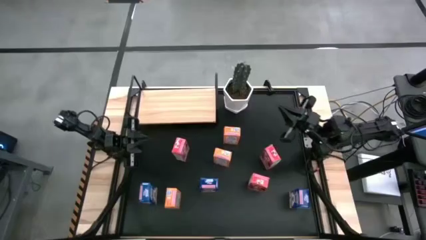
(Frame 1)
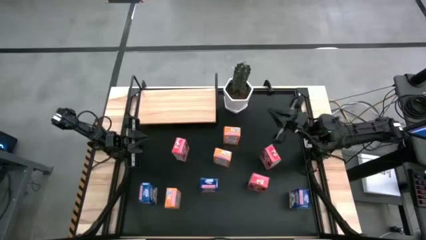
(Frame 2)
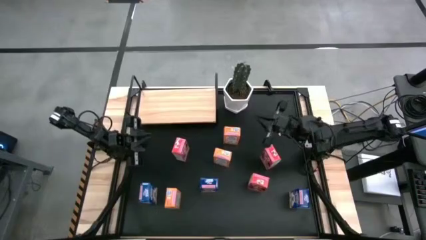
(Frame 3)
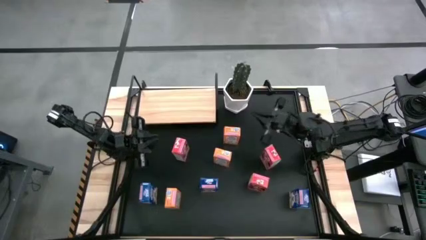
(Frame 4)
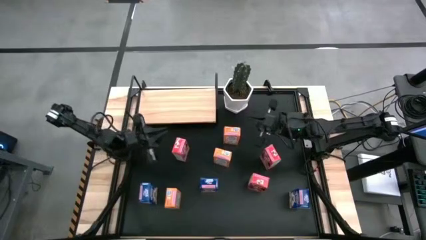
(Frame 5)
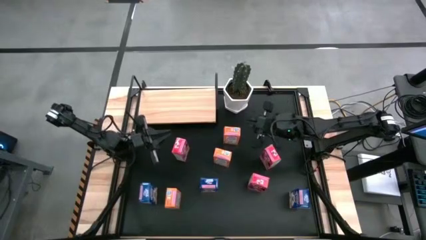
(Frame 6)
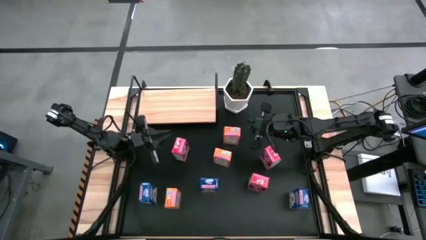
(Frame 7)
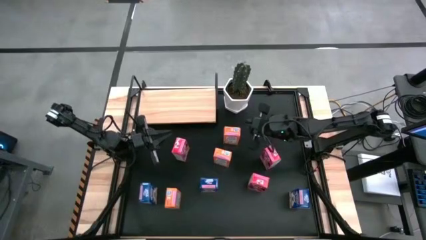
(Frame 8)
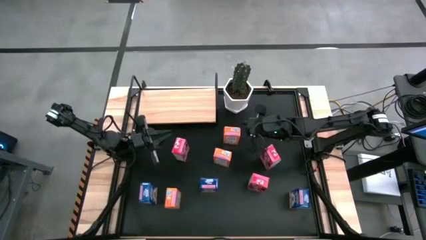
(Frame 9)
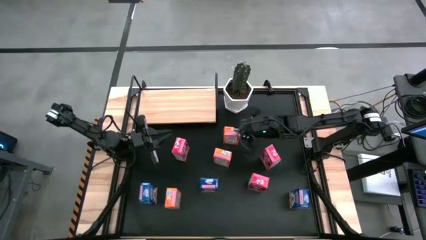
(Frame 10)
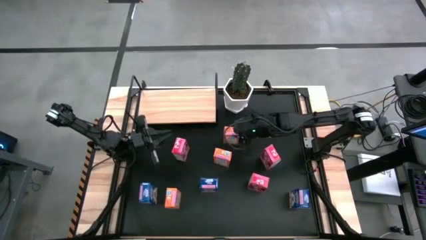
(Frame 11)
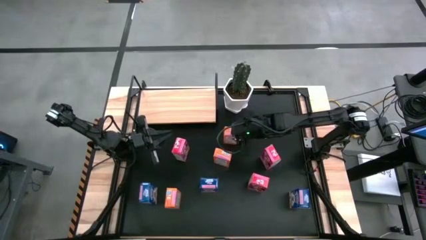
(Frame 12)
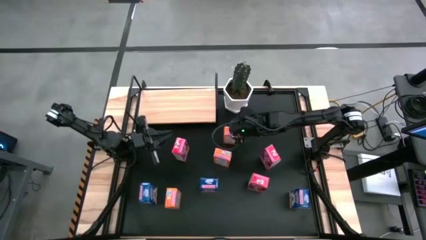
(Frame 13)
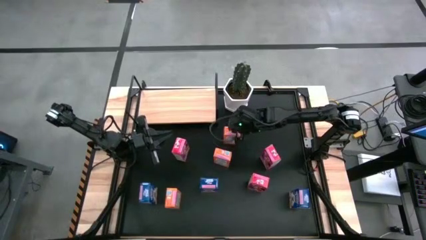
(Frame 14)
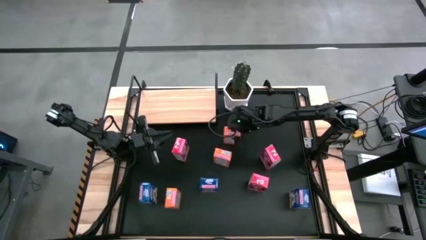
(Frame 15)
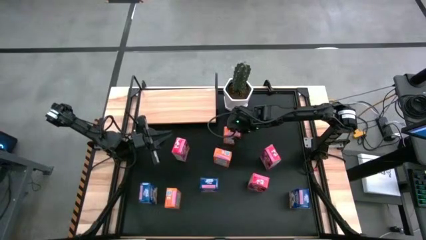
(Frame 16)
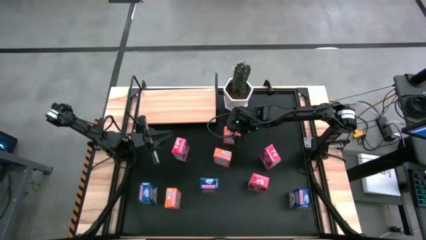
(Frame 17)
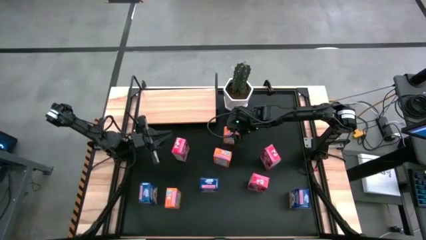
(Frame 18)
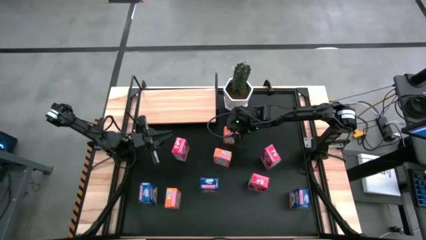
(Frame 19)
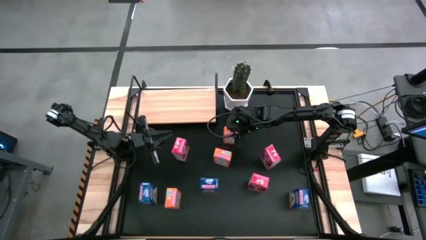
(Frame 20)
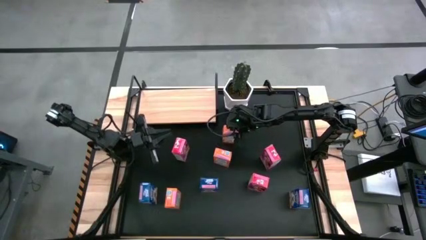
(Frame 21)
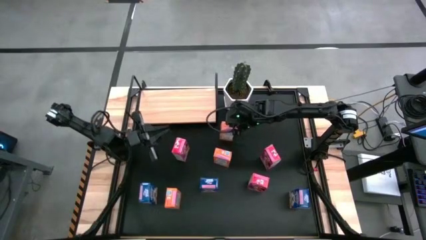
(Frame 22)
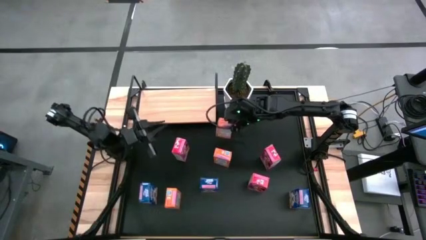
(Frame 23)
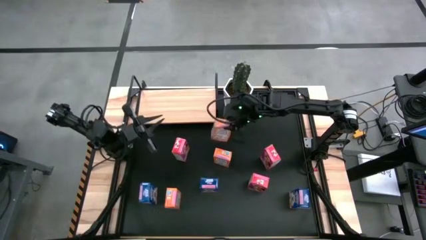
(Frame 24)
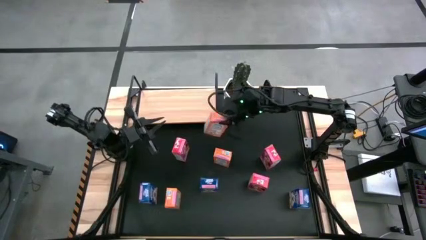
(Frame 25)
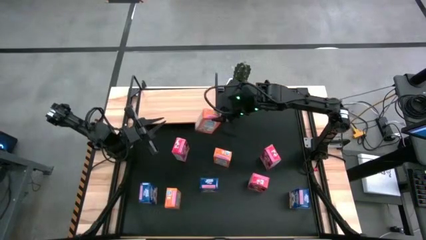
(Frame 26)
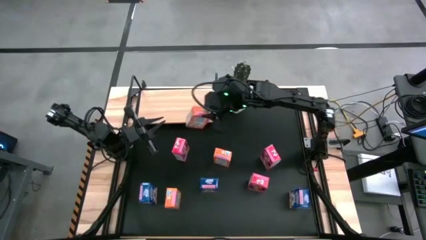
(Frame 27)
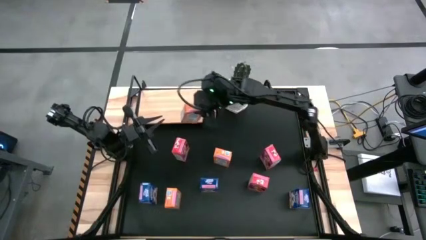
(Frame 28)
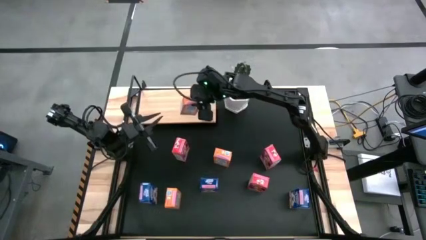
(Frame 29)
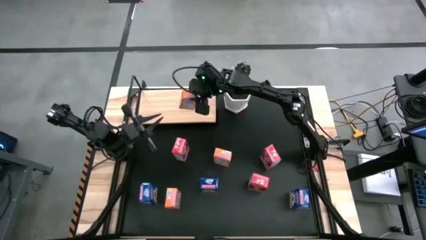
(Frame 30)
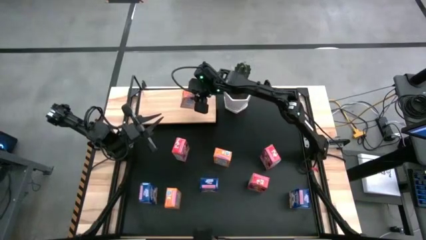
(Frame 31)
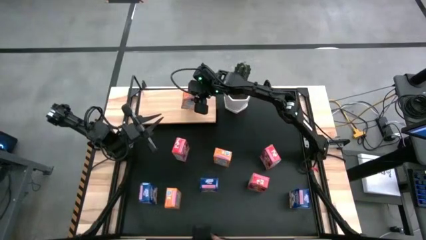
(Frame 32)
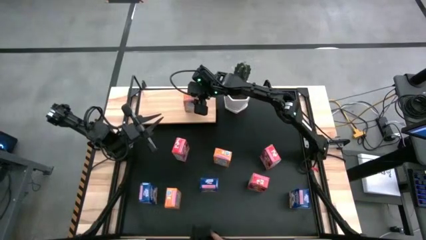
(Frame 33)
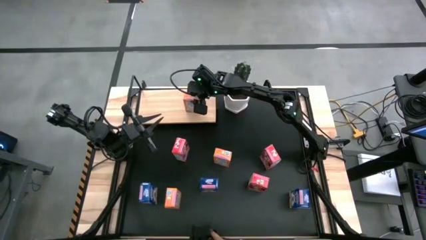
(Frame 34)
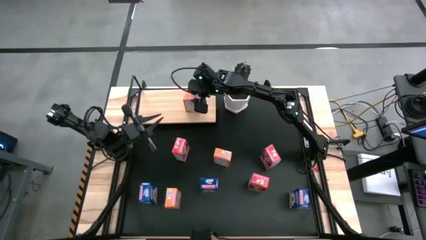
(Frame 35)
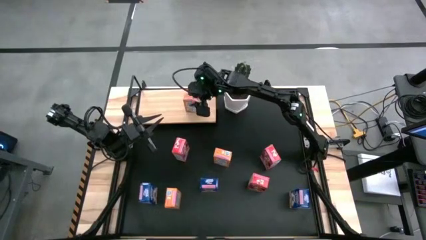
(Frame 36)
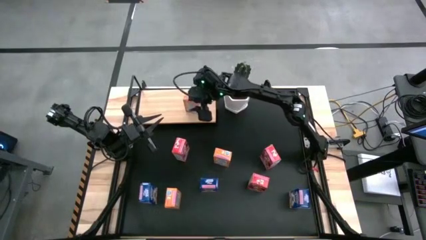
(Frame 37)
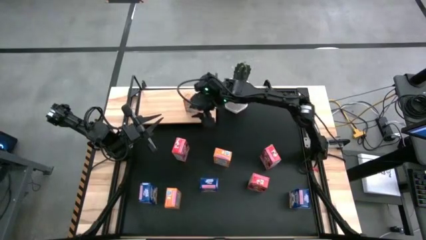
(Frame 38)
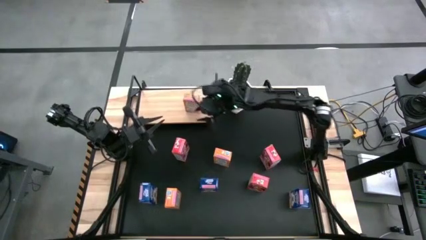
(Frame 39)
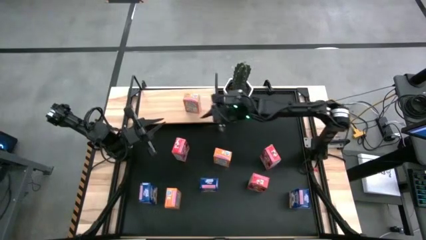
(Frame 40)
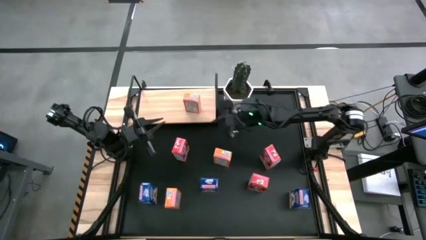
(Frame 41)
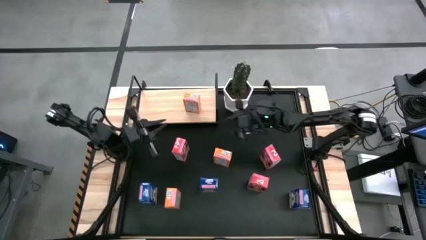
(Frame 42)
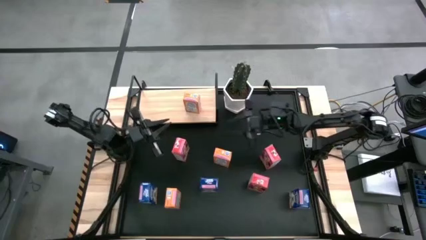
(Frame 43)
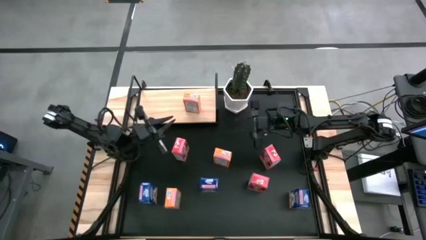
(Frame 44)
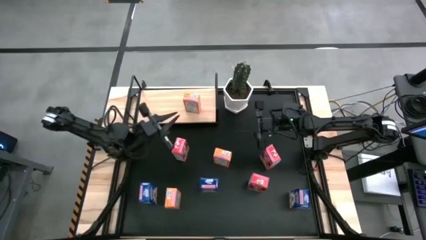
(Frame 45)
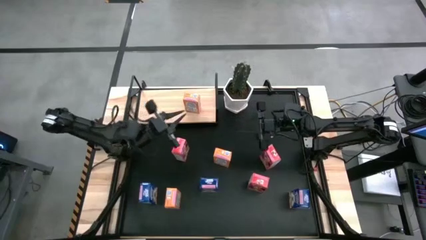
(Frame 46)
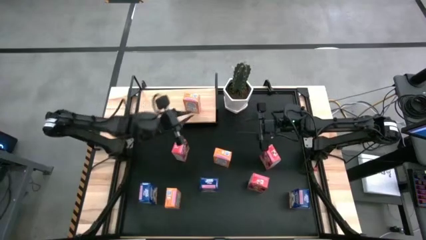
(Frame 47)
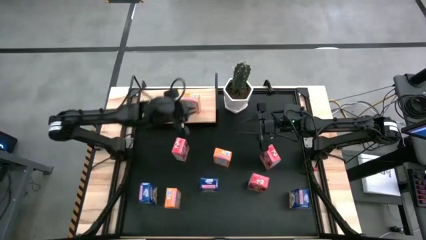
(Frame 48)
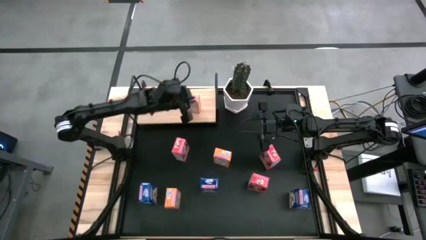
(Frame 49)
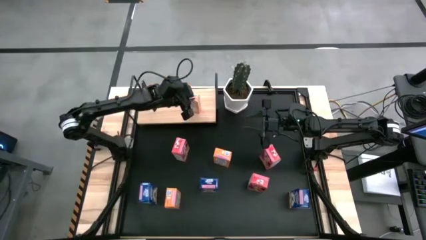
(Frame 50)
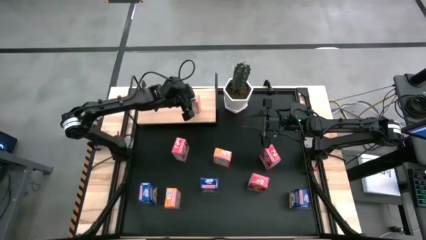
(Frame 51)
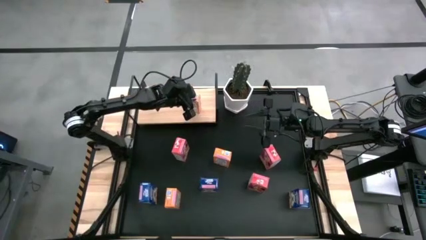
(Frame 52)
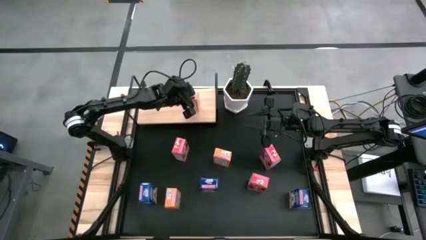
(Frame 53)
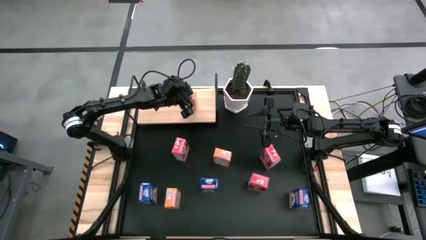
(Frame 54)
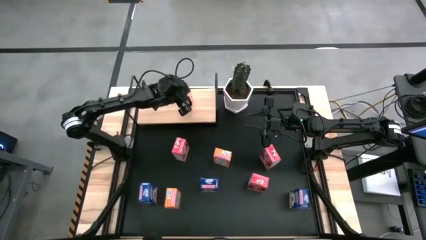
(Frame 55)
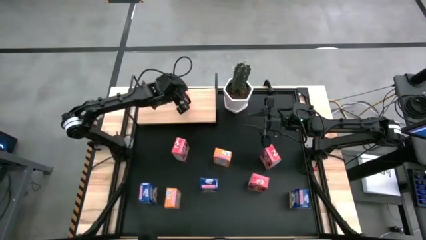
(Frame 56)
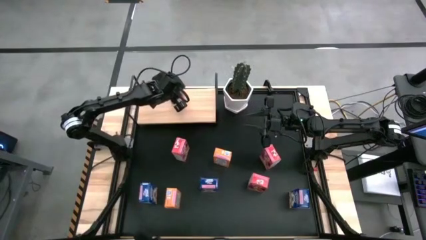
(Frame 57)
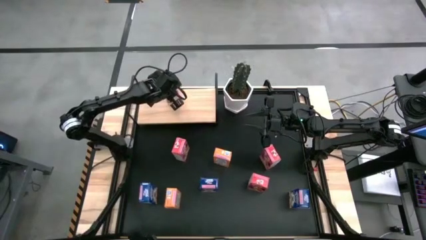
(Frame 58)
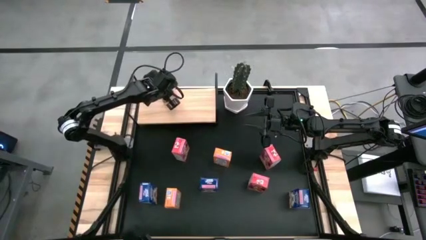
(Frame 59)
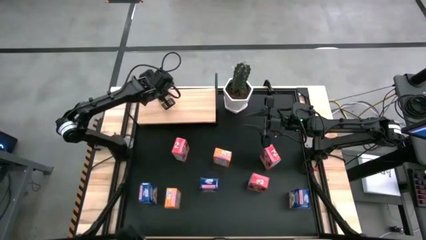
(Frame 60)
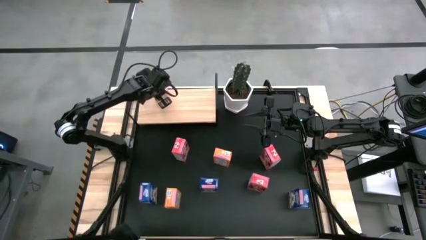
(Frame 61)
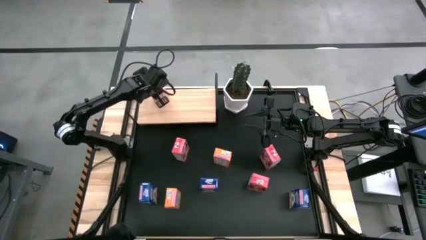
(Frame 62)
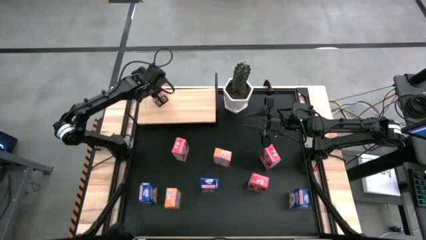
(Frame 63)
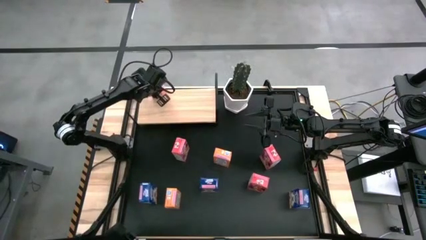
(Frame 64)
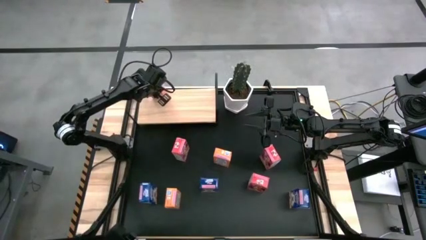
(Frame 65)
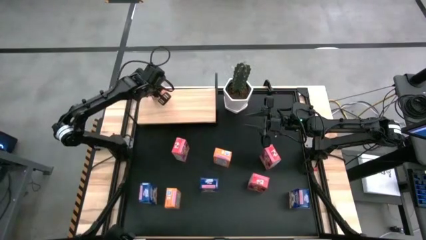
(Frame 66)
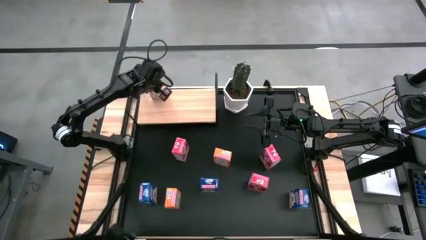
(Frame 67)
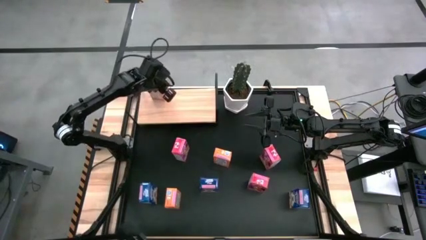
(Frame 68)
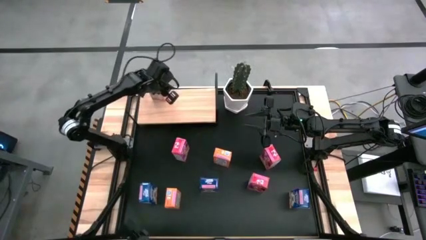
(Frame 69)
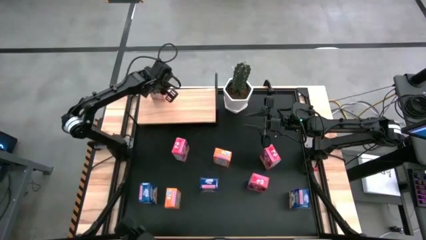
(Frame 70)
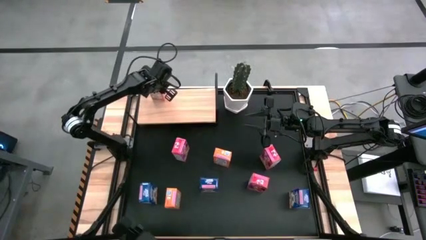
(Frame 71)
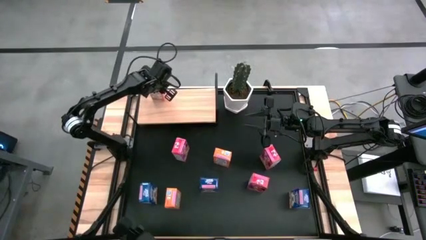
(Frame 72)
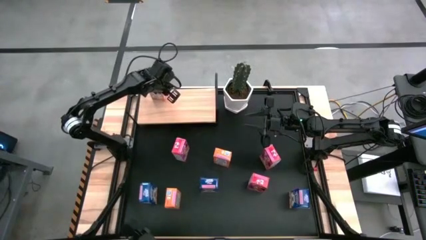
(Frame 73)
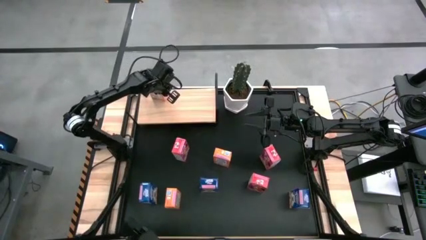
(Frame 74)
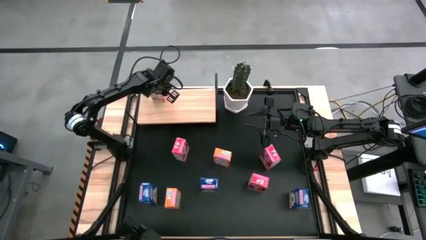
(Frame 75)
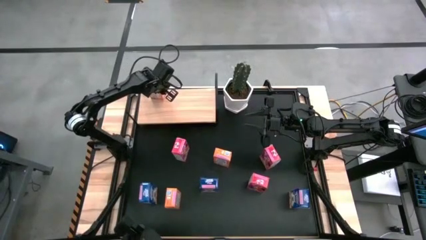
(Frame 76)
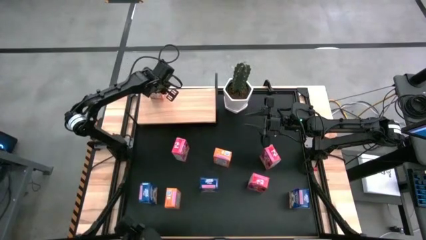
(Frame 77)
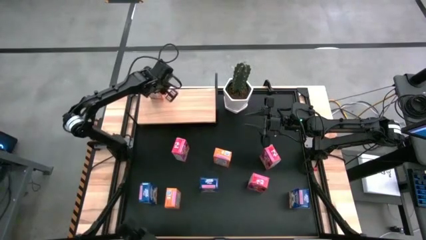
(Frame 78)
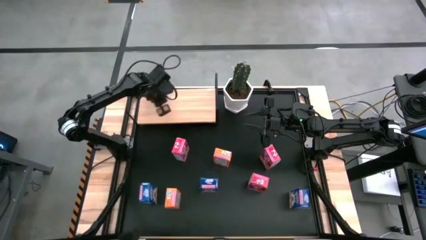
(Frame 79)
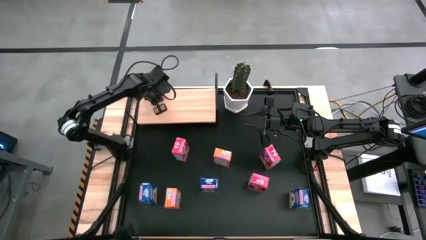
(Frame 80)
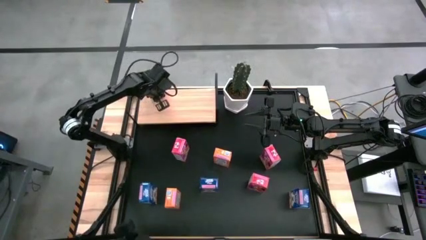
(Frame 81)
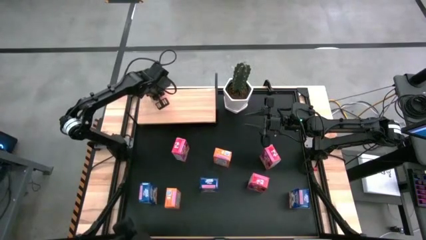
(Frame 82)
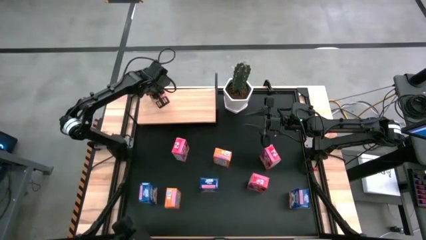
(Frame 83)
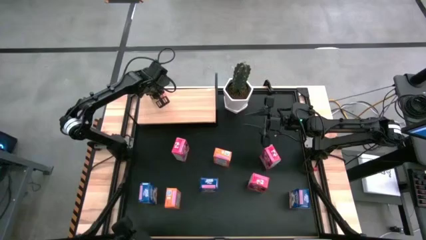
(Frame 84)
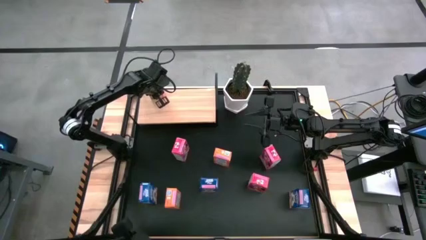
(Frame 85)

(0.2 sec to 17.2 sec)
Task: Stack cereal on shelf
Put the top orange cereal box on the shelf
